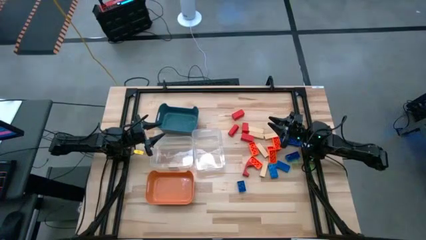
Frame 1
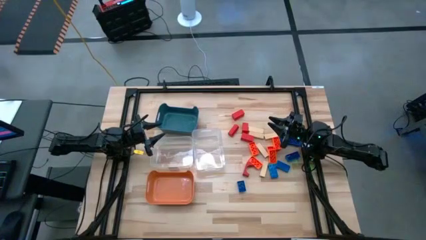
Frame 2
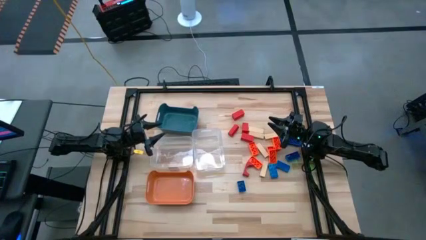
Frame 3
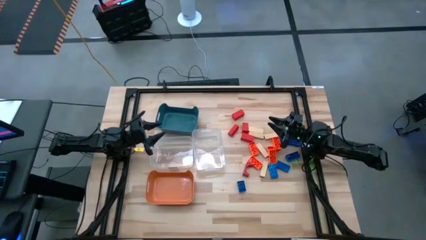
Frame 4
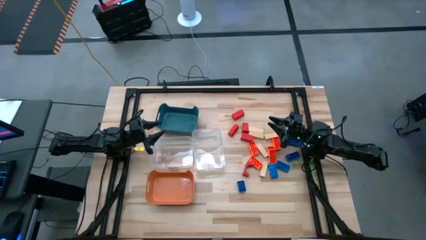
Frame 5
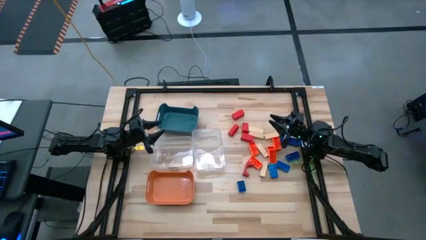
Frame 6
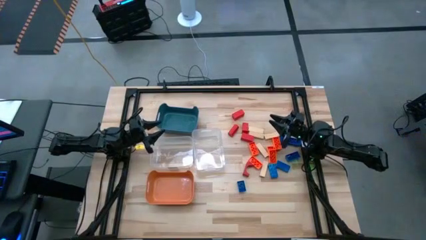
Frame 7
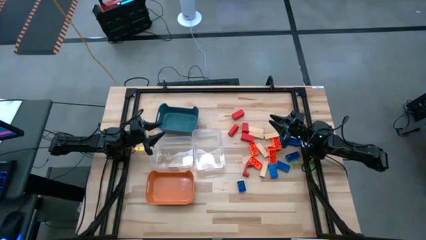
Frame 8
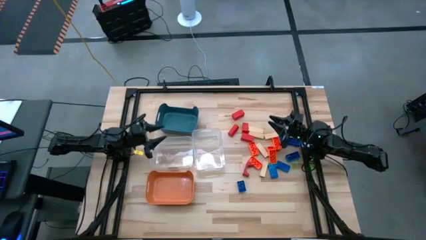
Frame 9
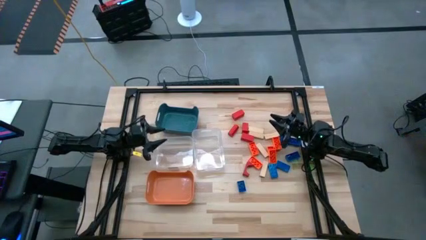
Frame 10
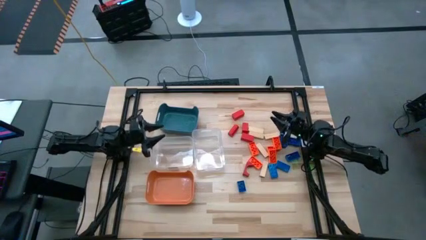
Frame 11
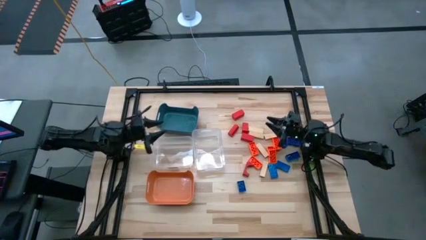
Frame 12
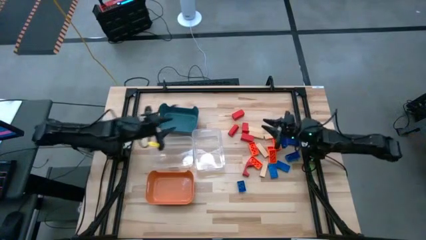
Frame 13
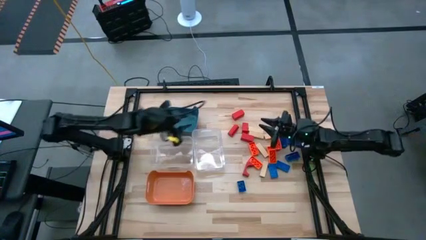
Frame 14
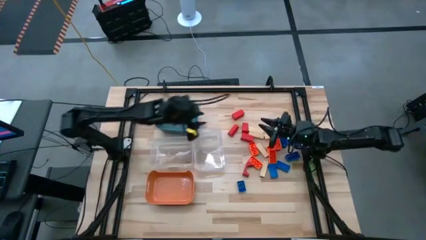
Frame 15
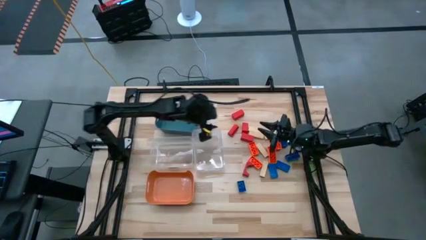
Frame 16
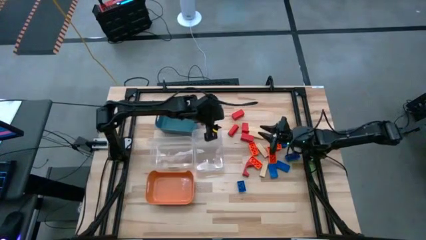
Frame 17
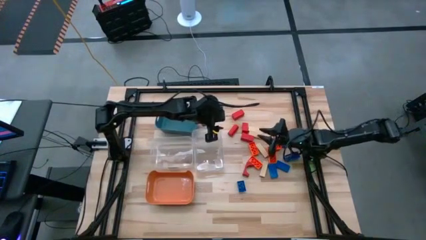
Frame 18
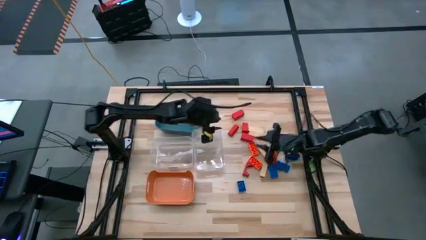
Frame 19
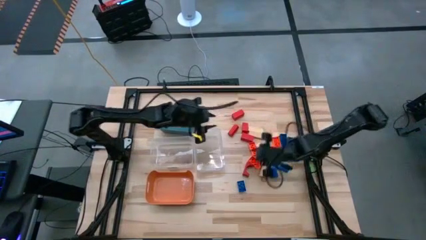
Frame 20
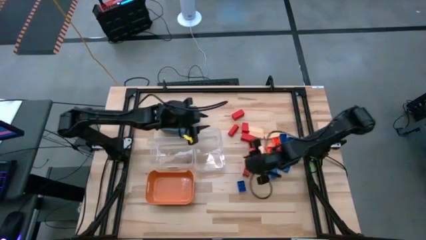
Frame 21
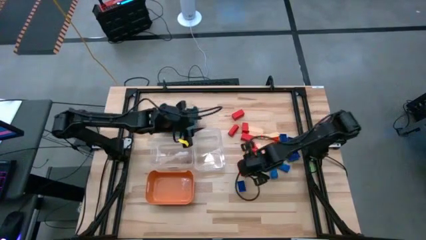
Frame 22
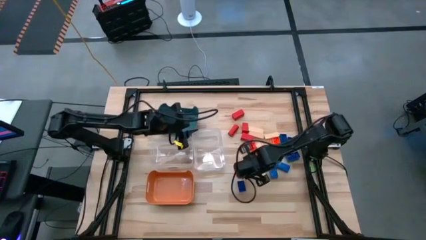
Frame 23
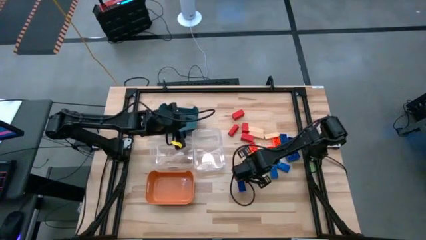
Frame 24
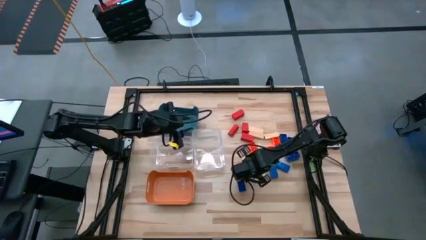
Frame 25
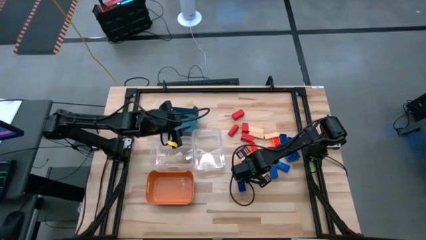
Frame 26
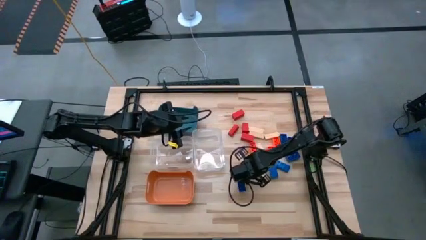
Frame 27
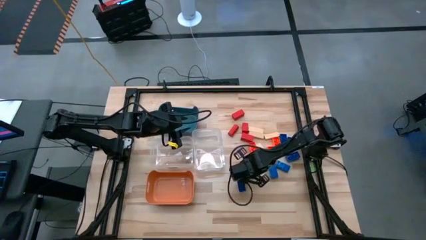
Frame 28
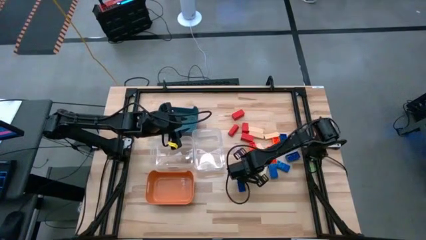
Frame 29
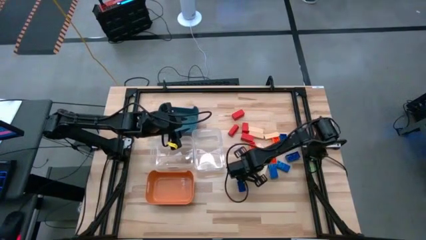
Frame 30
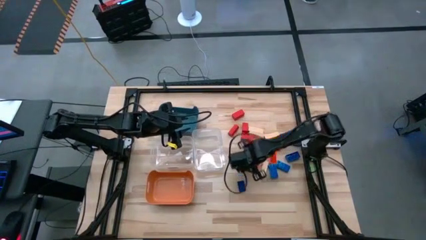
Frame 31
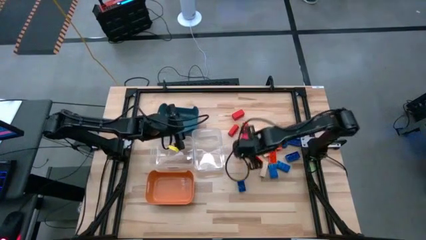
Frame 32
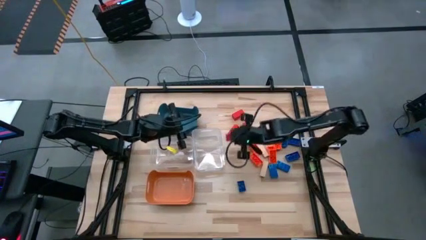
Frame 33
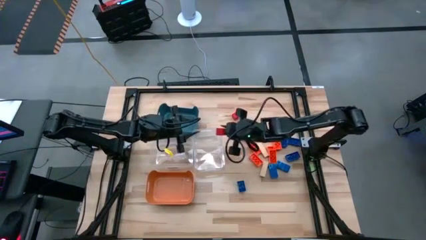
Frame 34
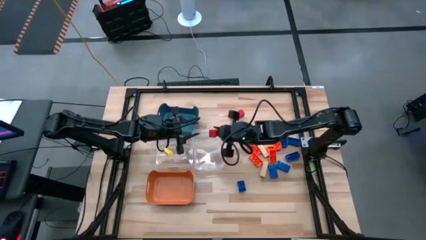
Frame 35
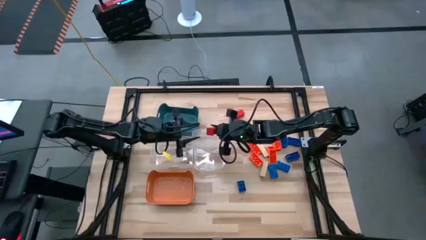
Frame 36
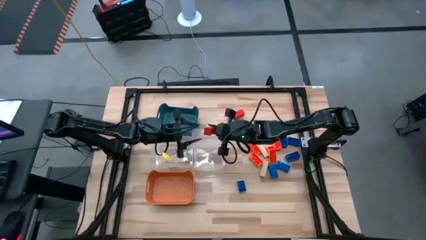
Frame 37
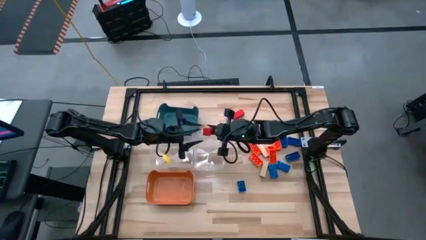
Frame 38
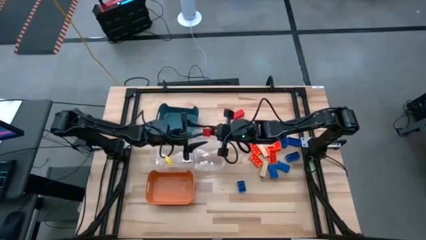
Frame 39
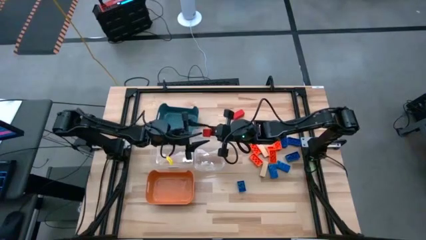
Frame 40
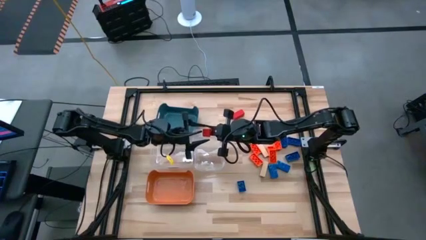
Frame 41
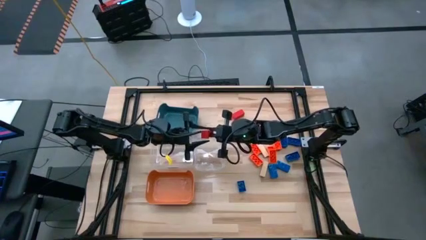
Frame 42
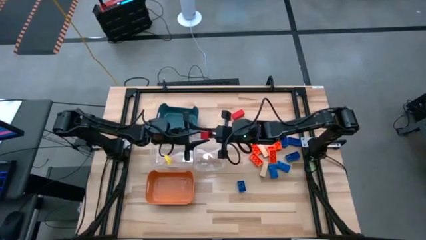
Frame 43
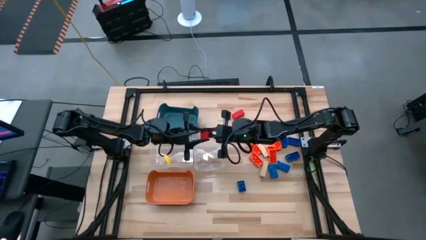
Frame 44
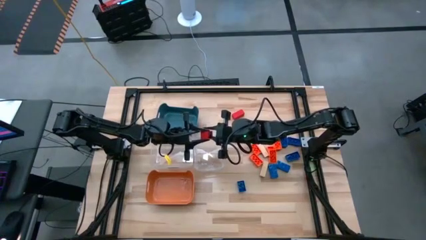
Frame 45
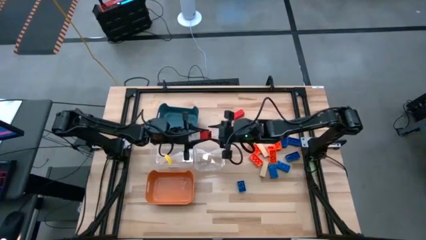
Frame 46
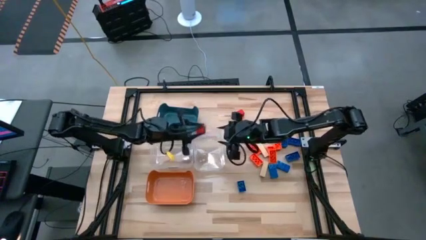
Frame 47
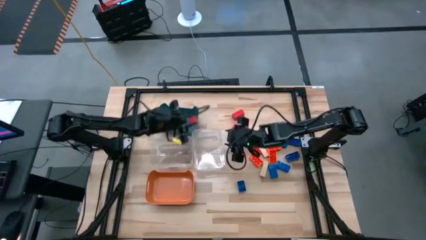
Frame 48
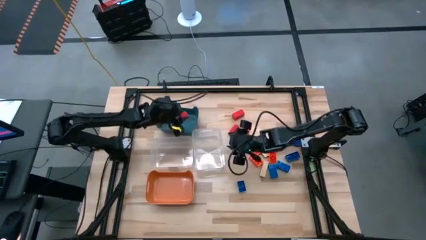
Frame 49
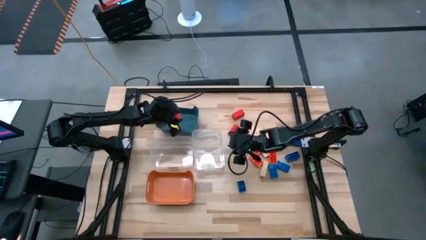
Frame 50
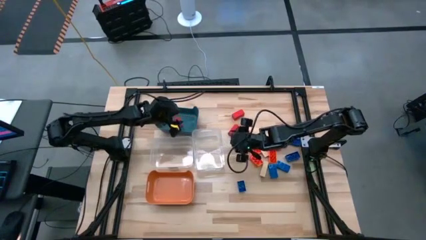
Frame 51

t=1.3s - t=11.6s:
Task: Sort blocks
Put the red block into the blue bin

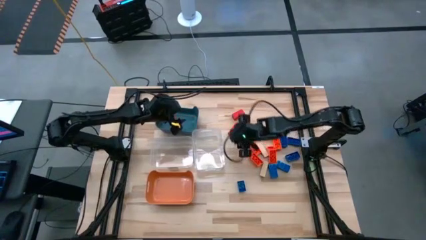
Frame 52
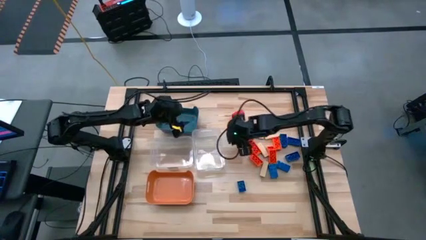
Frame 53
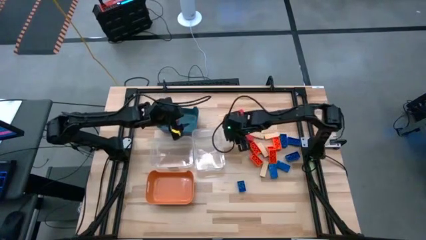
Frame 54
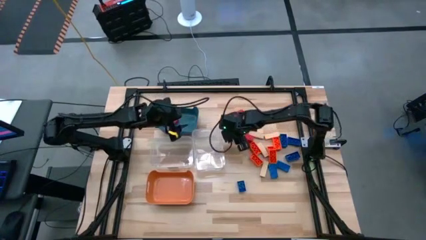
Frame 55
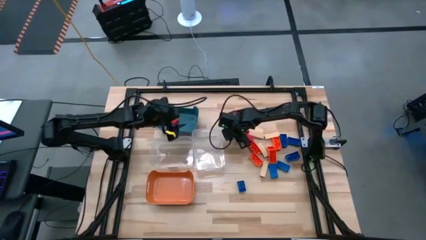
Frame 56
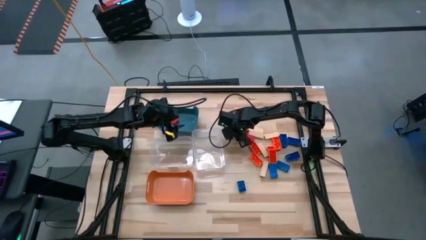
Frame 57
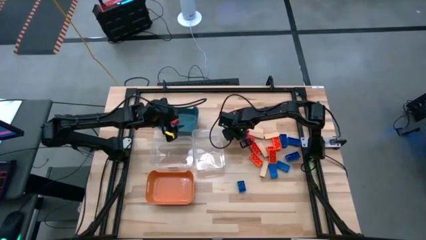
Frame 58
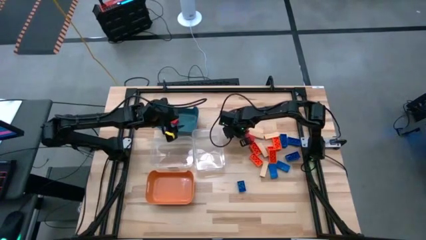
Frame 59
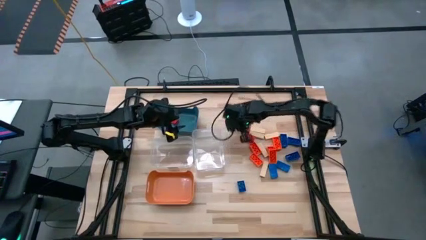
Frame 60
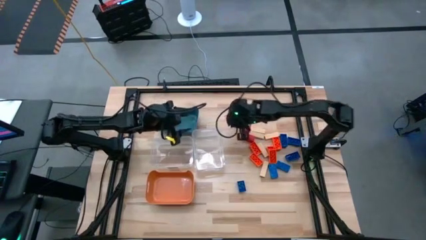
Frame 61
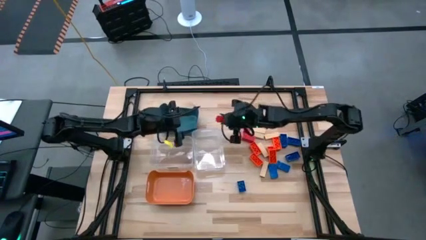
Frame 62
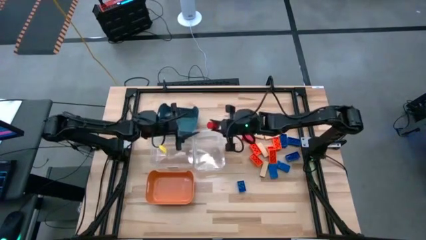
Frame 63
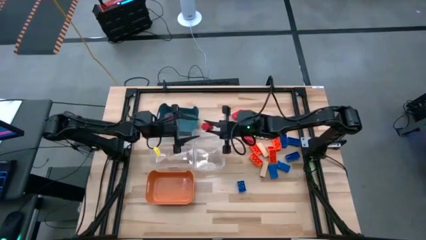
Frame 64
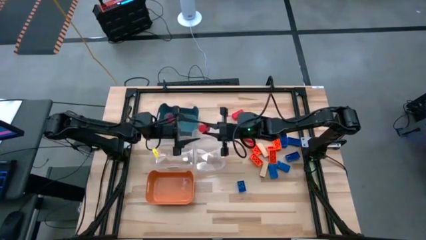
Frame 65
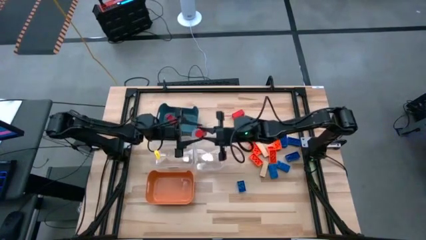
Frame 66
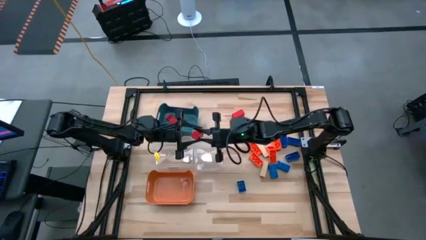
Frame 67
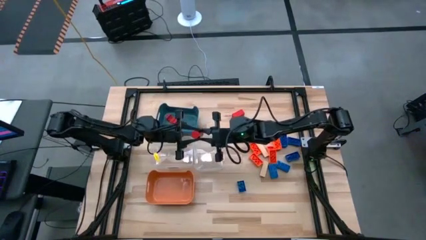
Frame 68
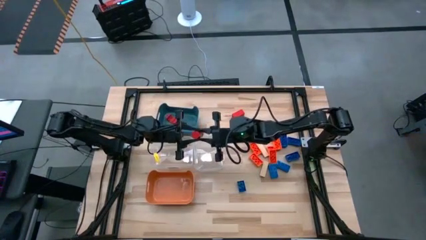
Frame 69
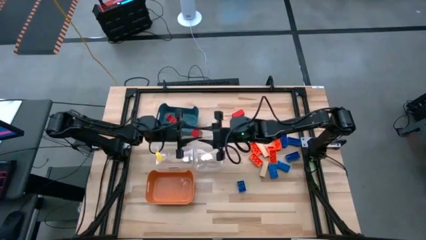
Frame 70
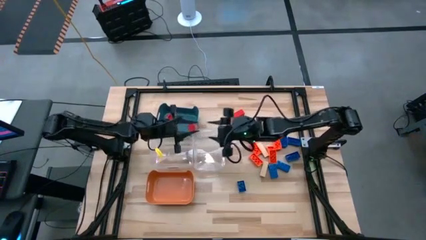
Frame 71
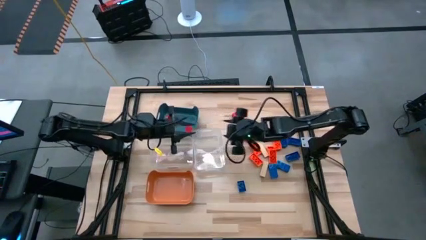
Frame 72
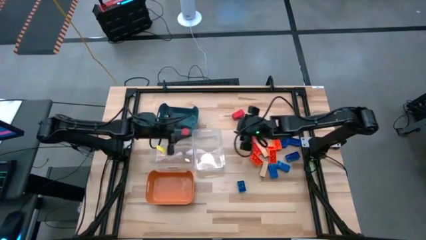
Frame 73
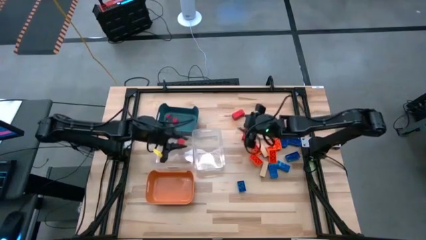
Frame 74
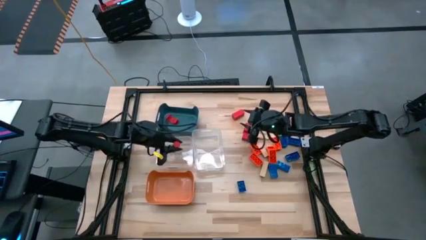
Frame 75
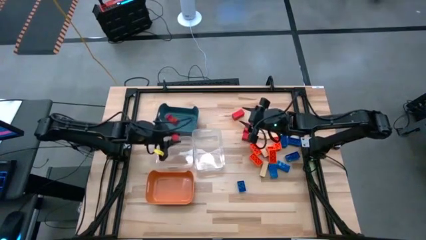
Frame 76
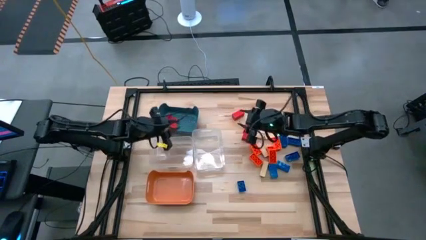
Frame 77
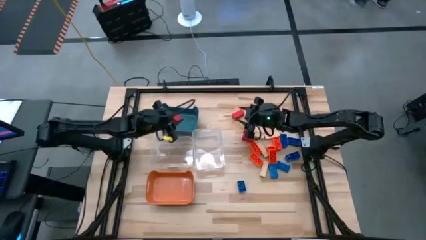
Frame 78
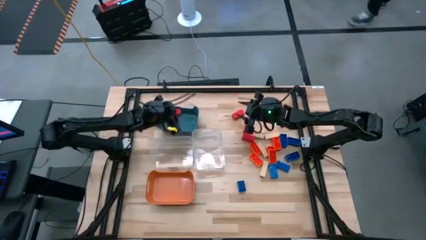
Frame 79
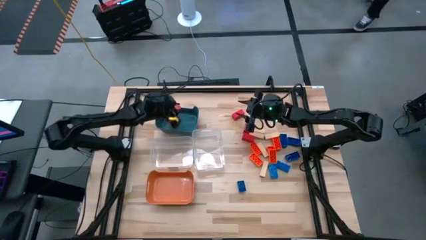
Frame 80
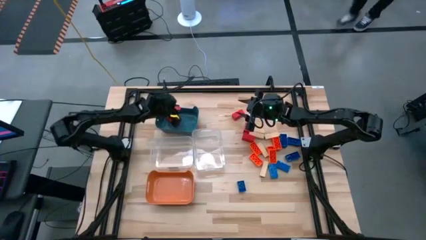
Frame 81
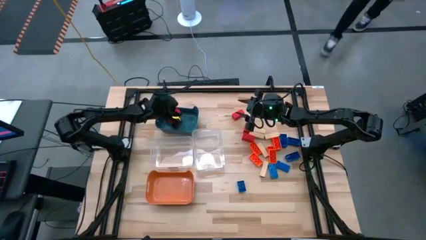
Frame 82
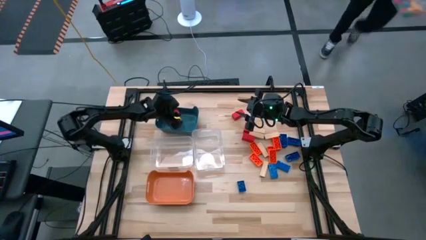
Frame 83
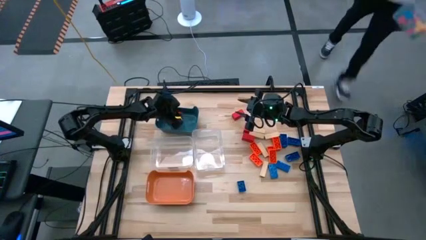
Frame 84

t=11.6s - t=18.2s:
Put the red block into the blue bin
